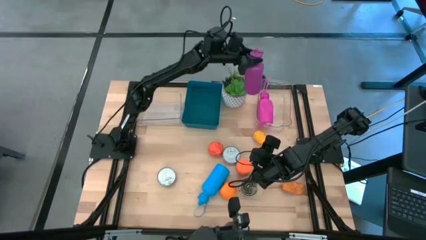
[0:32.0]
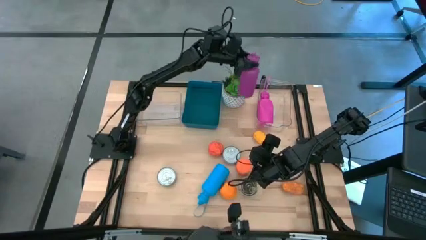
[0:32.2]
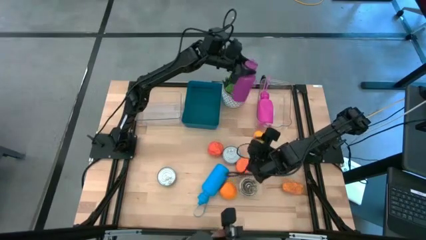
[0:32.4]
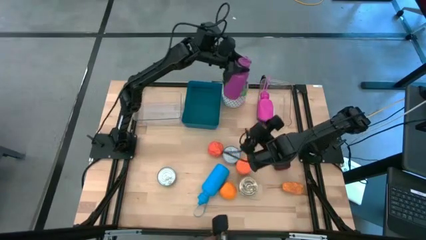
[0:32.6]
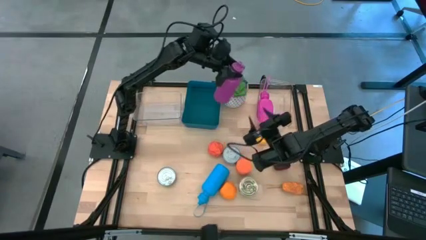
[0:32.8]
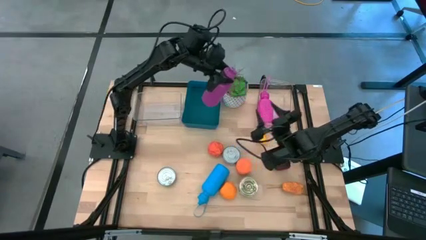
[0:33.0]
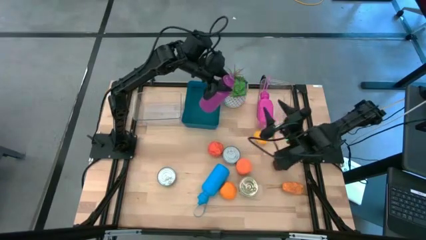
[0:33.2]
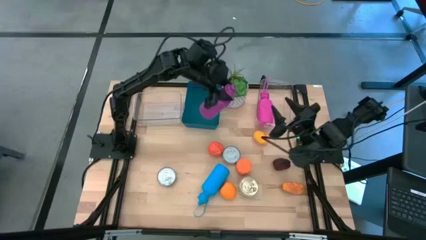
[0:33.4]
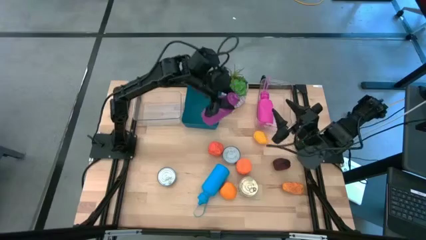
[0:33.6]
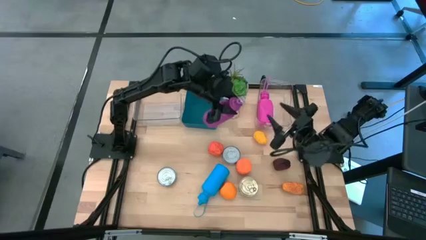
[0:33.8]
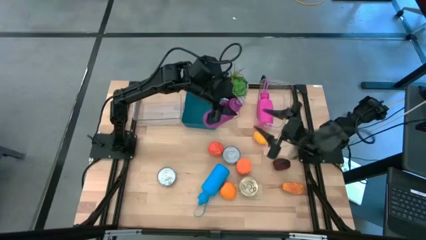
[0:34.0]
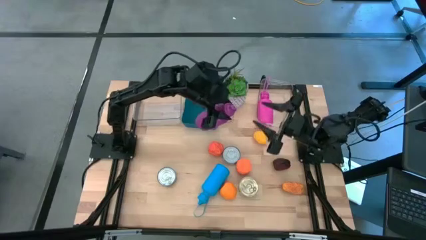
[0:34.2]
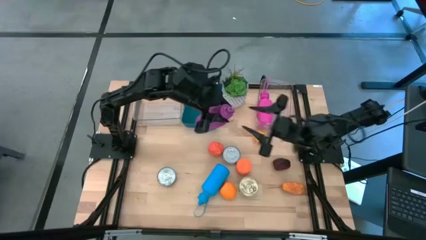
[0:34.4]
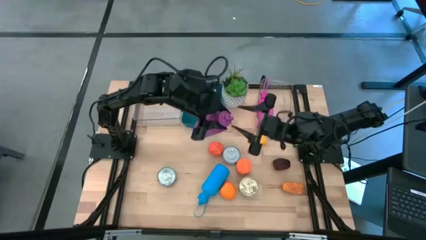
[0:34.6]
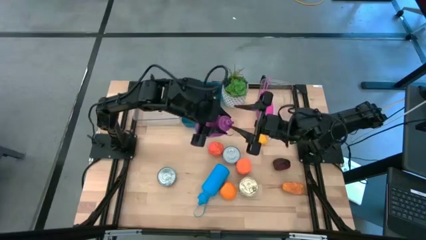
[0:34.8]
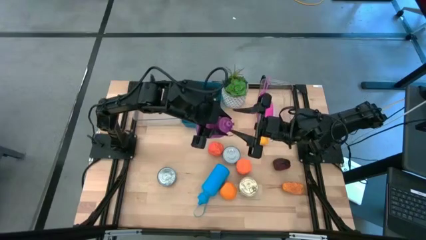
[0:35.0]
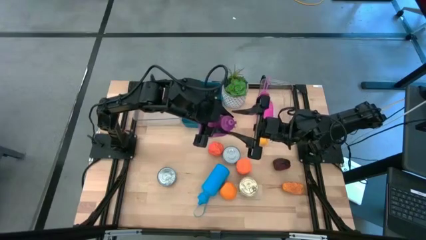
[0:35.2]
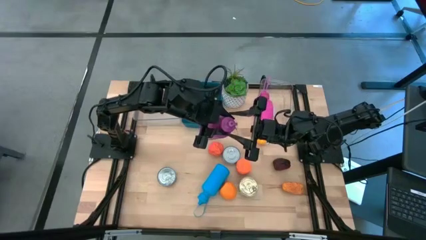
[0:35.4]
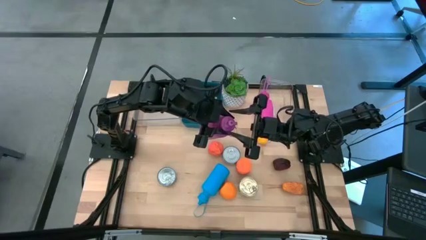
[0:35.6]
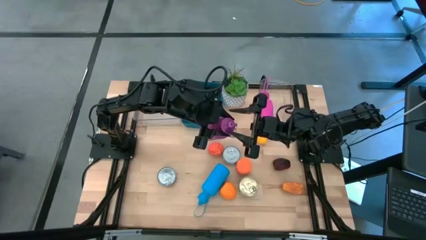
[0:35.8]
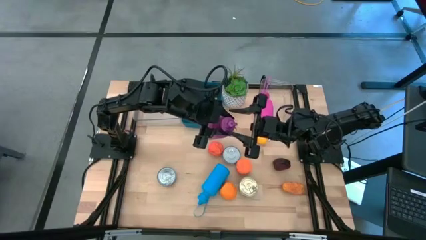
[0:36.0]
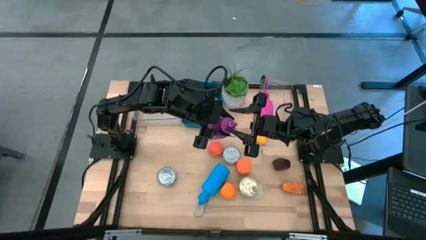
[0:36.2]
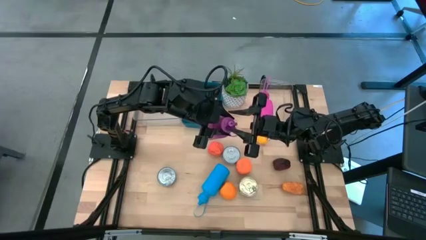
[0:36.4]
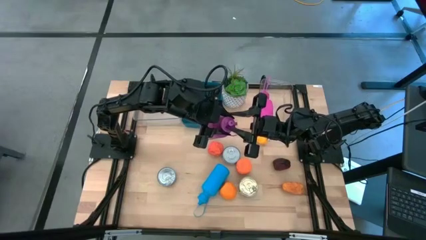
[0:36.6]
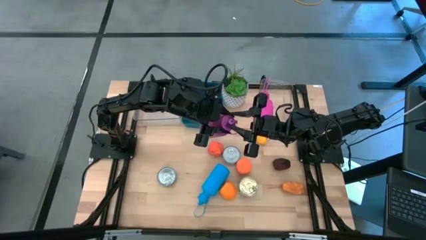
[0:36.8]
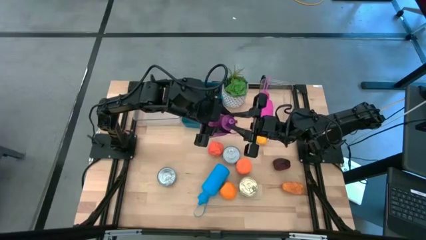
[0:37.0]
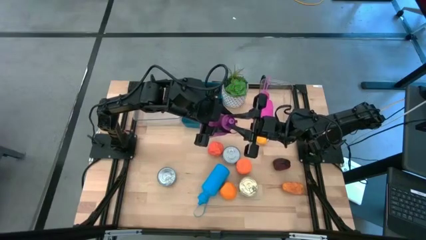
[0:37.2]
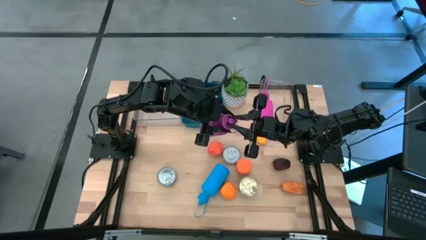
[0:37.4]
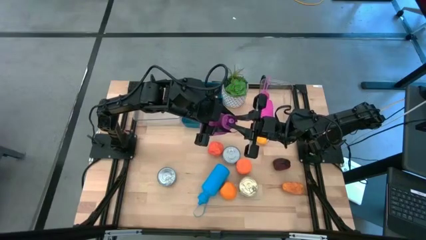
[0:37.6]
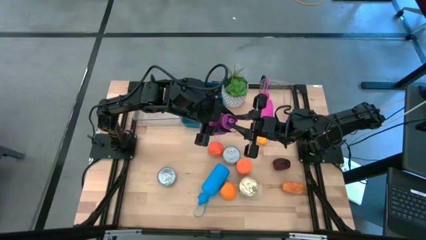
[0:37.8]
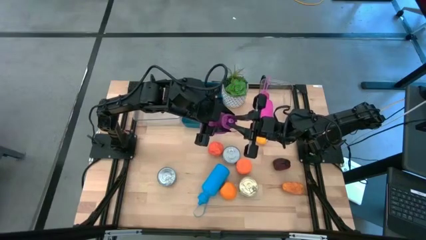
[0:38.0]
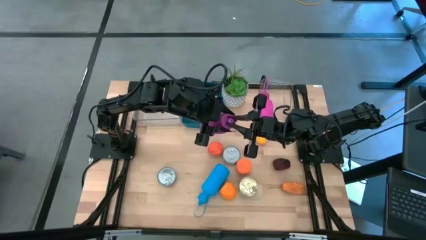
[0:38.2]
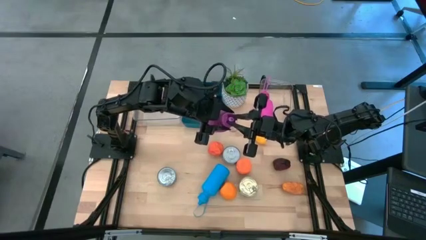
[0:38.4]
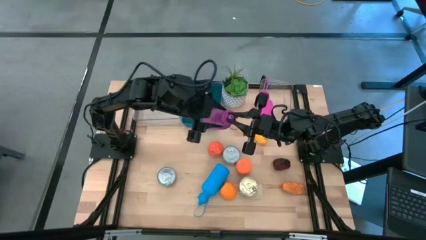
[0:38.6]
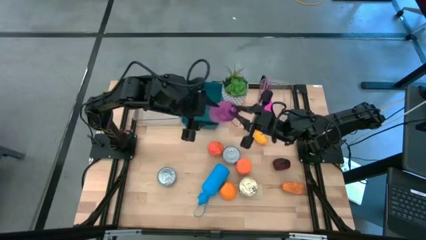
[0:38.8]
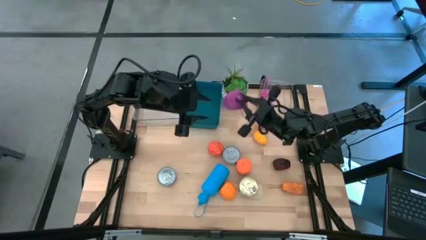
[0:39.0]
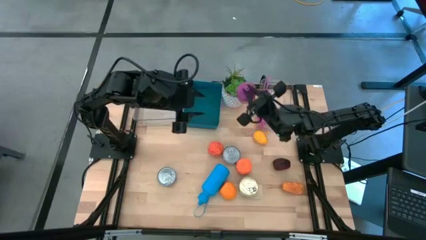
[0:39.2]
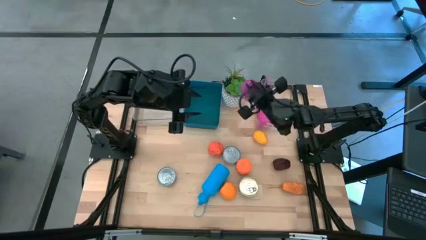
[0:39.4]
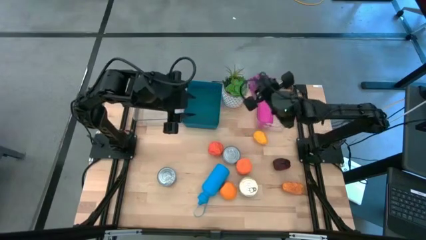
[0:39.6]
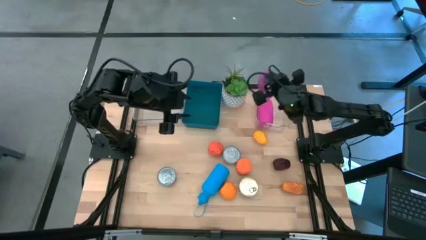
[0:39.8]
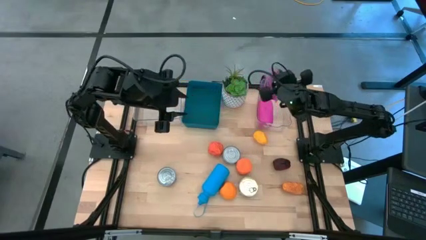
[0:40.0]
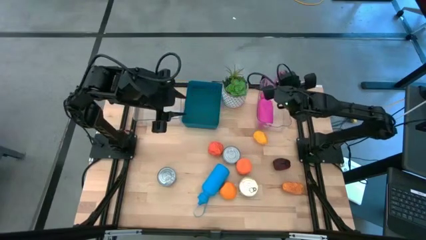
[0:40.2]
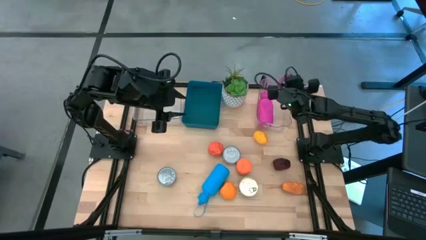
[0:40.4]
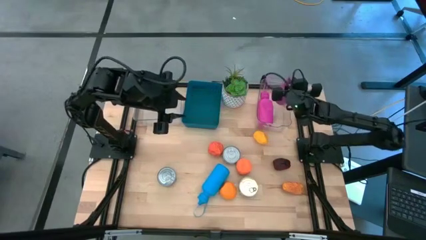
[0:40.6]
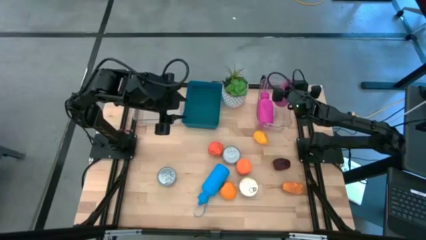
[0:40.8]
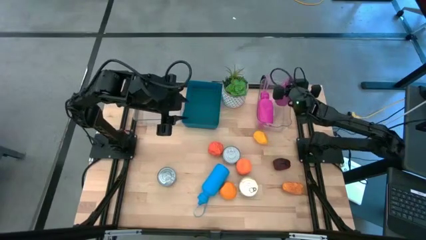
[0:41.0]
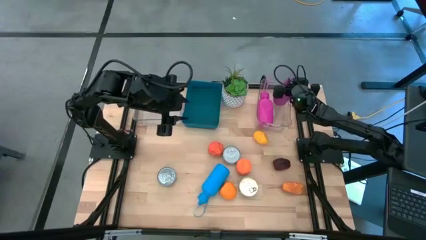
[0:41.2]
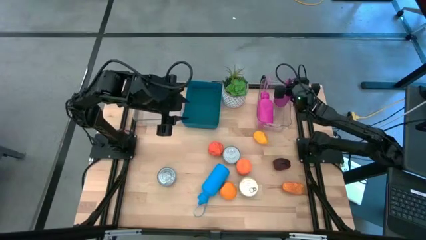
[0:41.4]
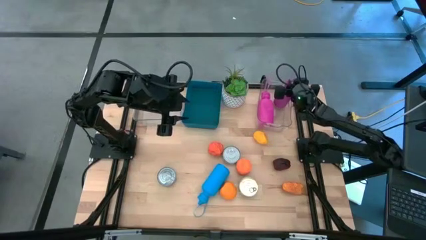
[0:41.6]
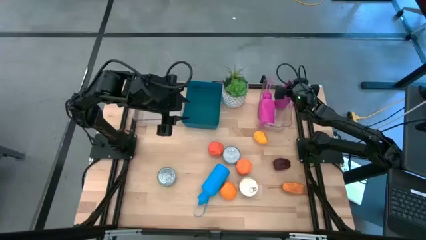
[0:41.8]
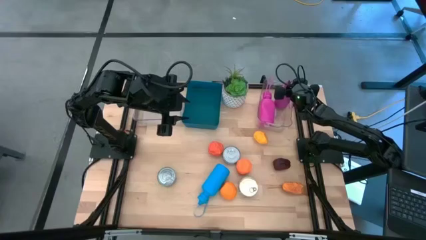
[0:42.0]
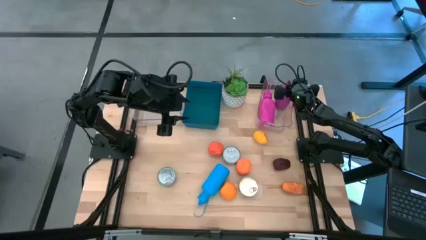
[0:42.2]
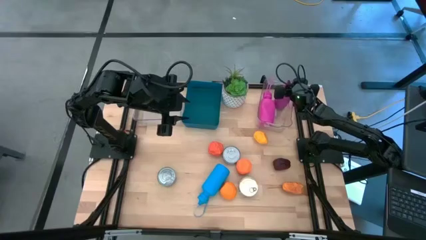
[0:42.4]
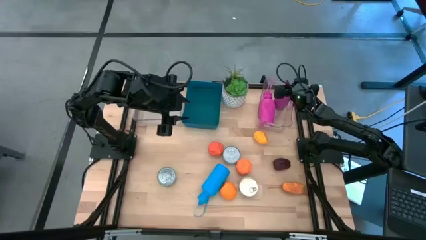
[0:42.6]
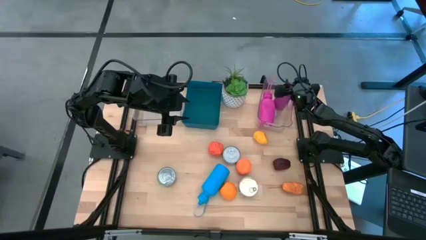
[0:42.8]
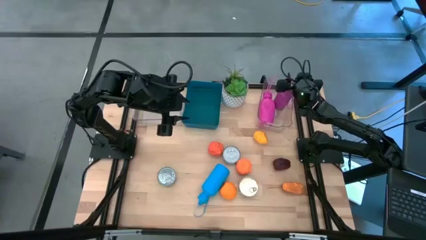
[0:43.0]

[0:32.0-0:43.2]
Task: Pick & Place Food Item
Put the purple water bottle into the right transparent bin

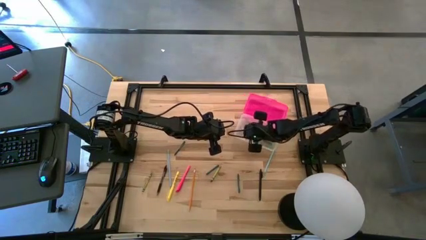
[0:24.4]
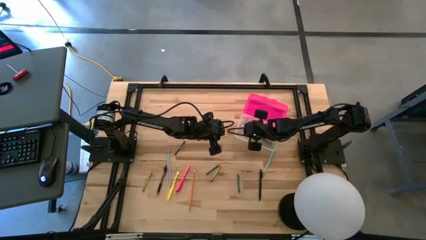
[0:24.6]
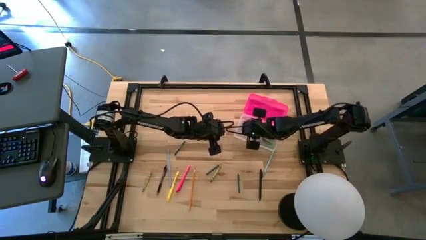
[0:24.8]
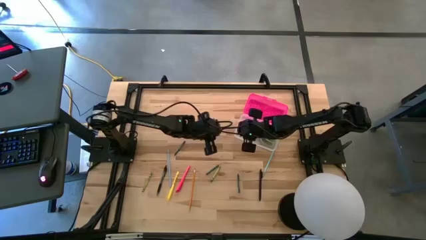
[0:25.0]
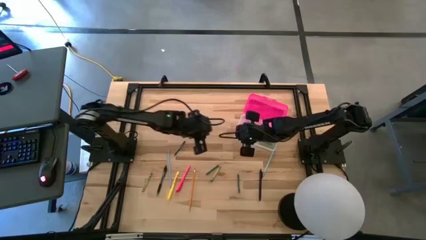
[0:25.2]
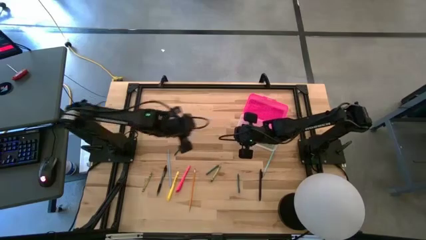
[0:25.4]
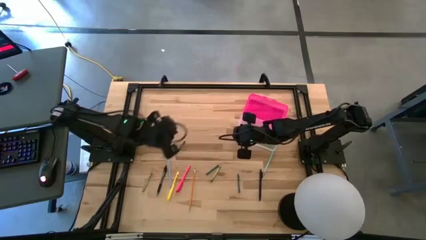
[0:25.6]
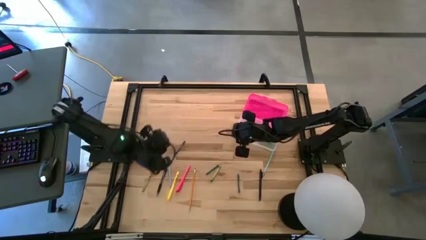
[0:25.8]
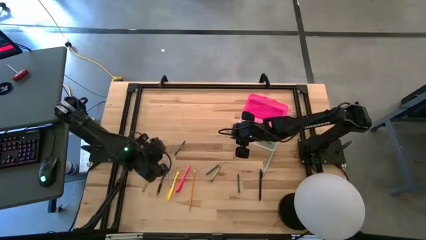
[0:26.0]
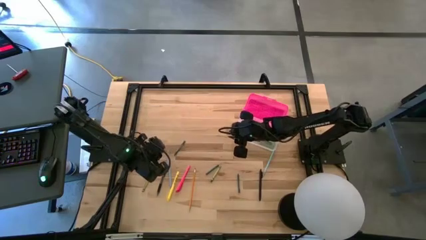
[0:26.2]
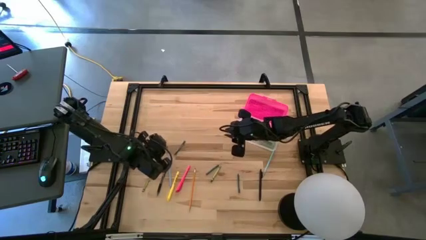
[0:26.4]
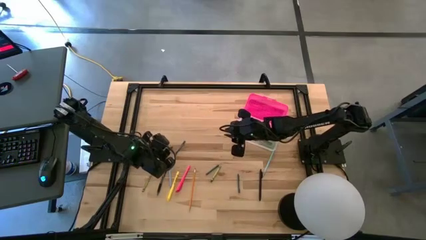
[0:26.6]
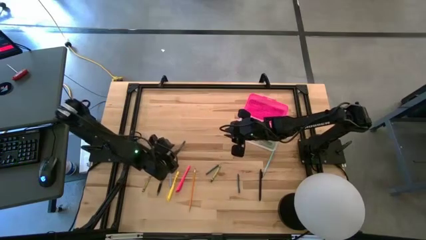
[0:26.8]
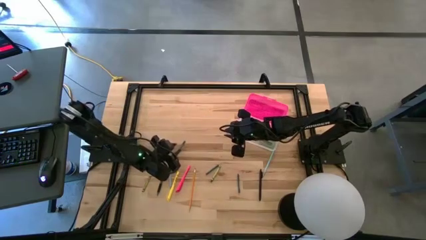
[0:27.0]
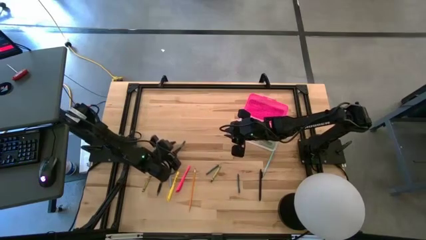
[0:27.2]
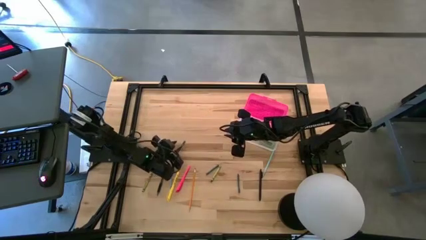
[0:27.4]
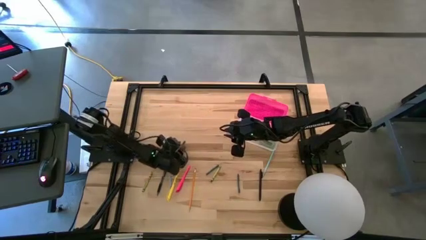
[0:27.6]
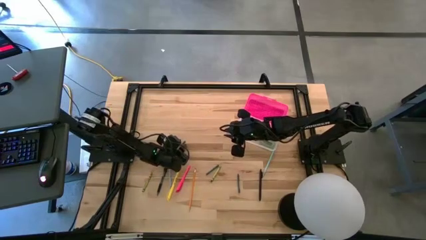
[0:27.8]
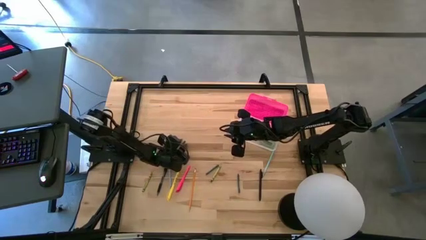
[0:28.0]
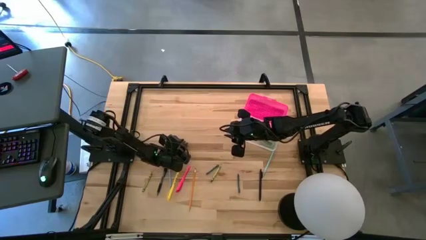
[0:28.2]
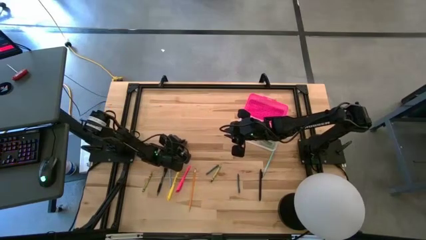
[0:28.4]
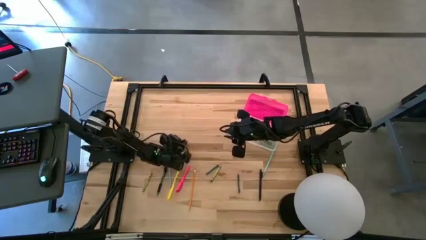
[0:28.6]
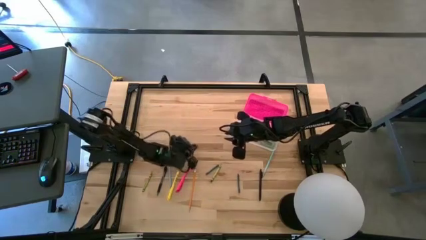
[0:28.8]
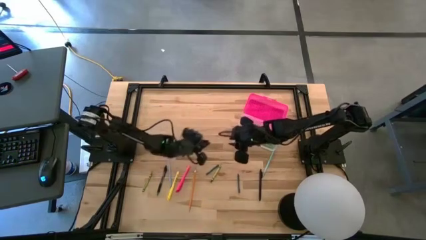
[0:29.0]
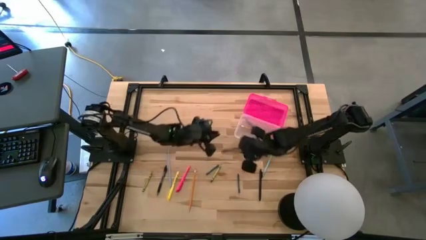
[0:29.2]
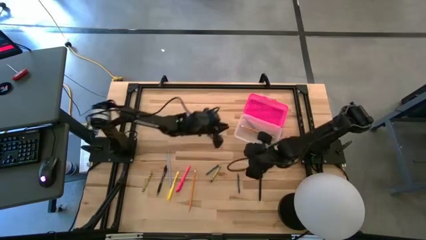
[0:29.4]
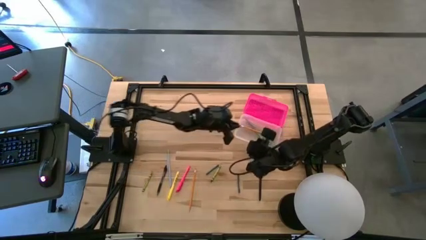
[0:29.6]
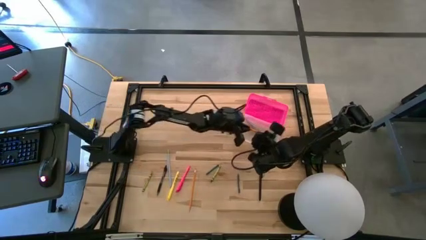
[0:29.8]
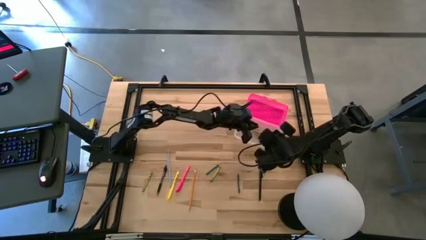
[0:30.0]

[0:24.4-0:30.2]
Task: Pick & place school supplies into a supply box
Put the top dark green crayon into the pink supply box
